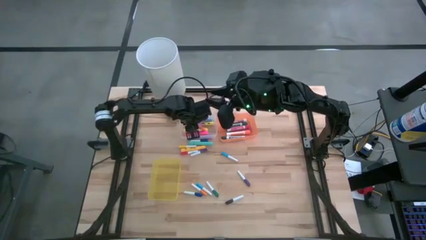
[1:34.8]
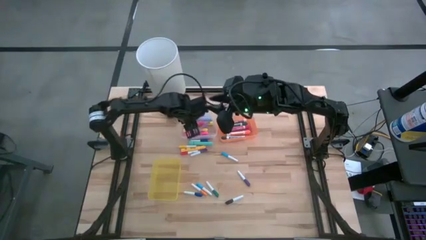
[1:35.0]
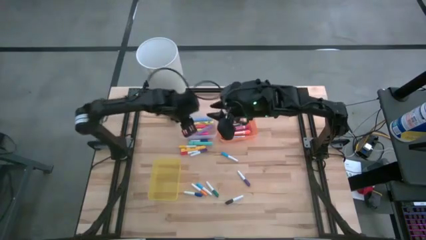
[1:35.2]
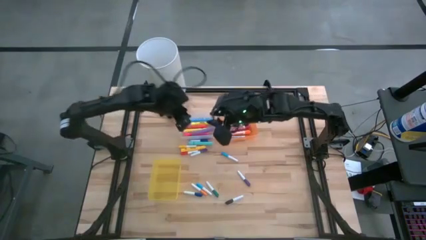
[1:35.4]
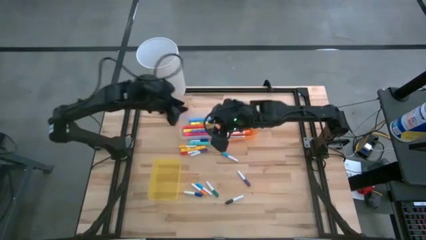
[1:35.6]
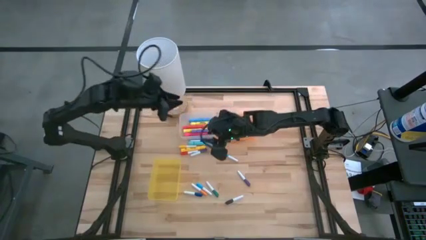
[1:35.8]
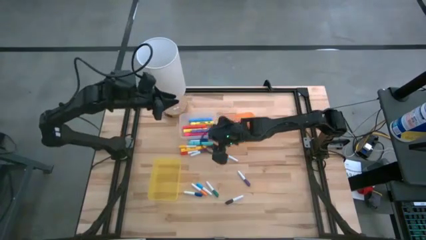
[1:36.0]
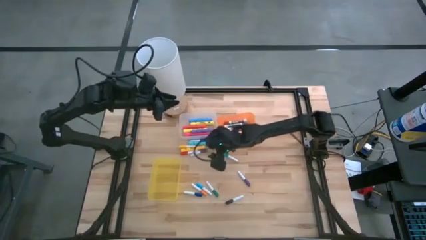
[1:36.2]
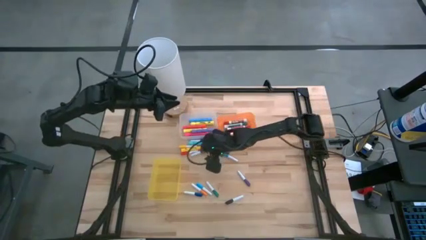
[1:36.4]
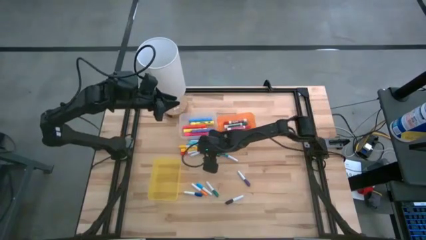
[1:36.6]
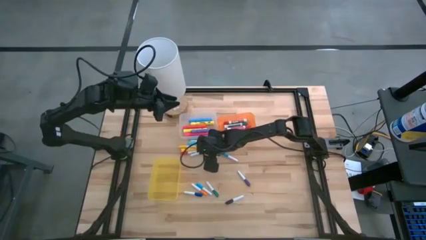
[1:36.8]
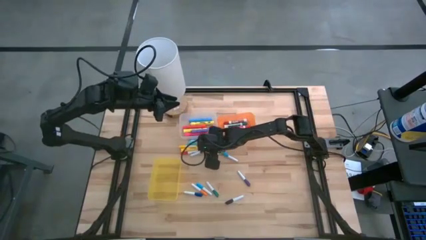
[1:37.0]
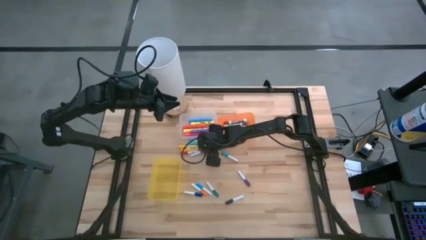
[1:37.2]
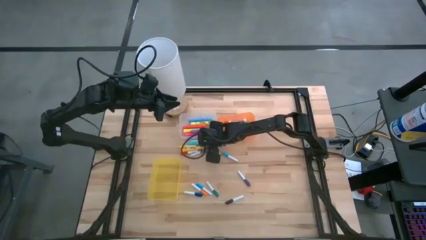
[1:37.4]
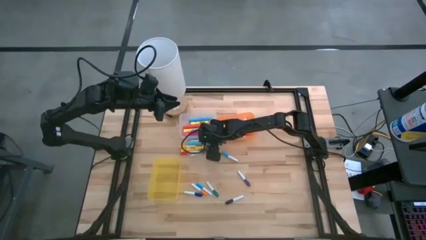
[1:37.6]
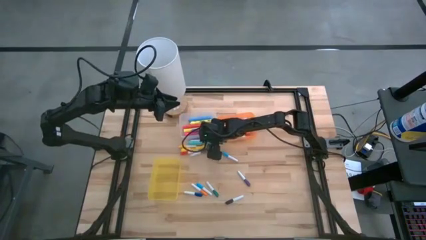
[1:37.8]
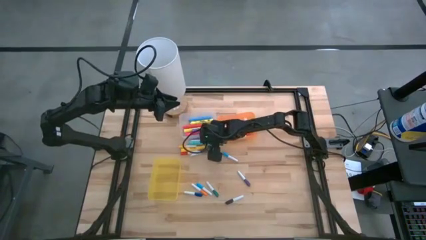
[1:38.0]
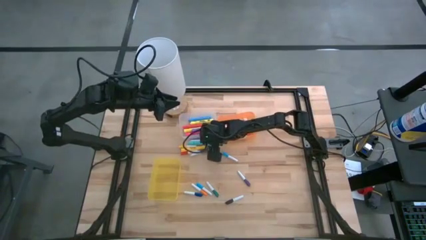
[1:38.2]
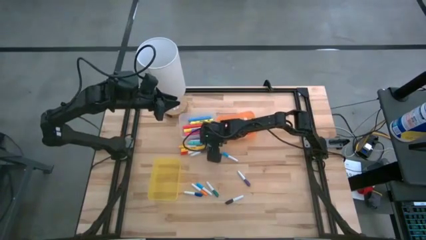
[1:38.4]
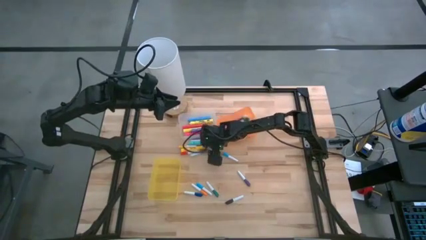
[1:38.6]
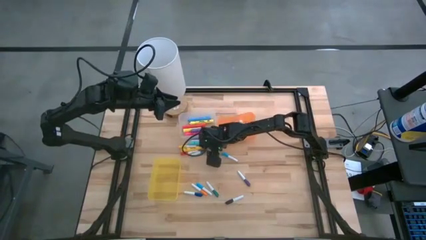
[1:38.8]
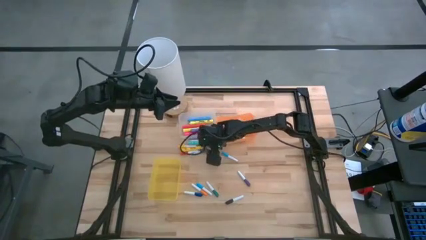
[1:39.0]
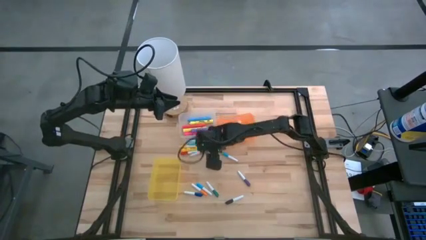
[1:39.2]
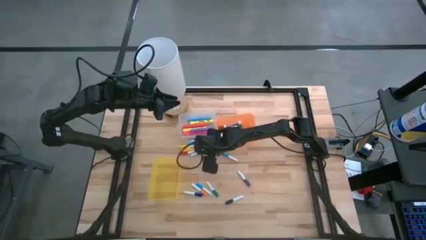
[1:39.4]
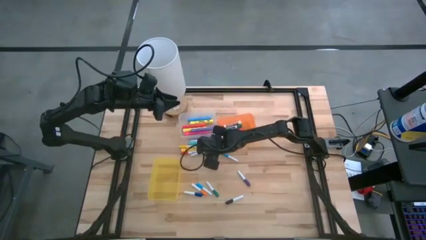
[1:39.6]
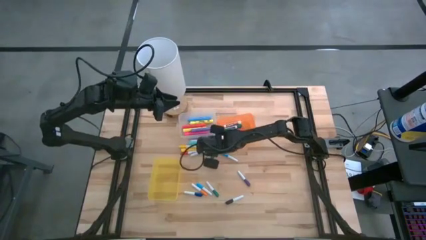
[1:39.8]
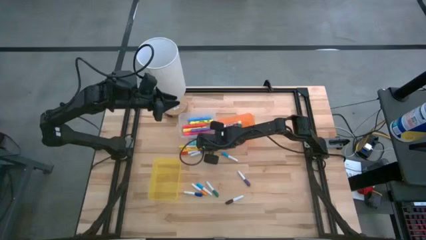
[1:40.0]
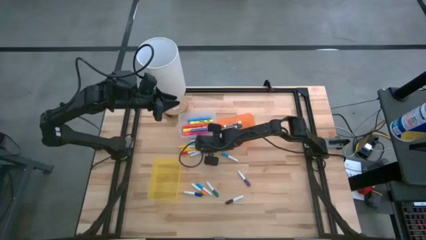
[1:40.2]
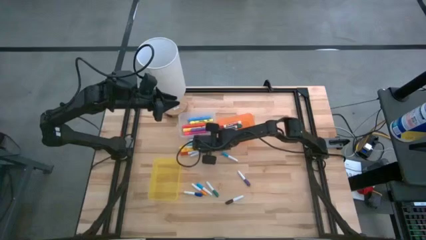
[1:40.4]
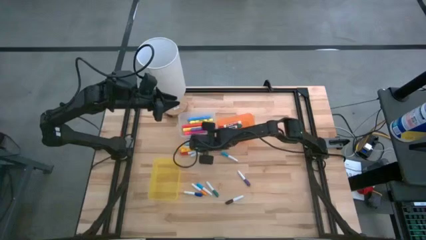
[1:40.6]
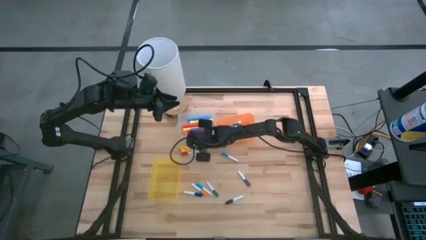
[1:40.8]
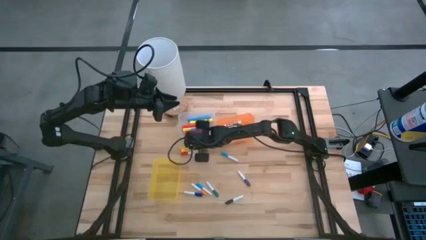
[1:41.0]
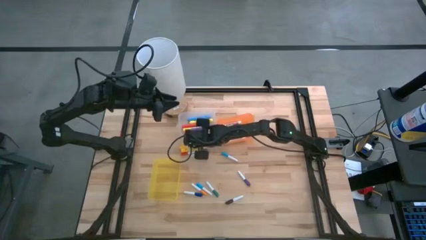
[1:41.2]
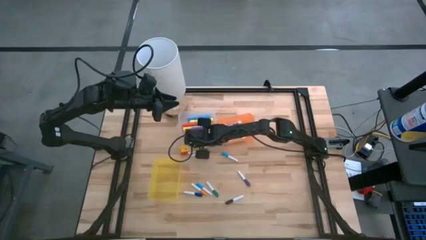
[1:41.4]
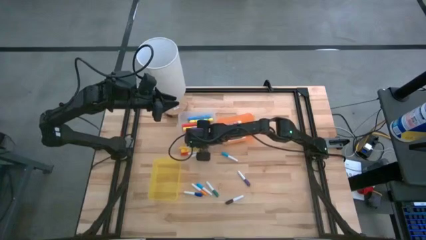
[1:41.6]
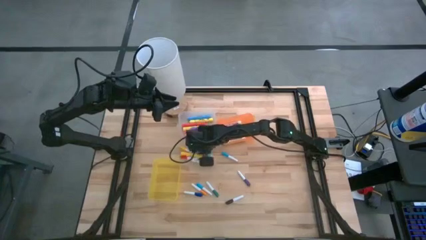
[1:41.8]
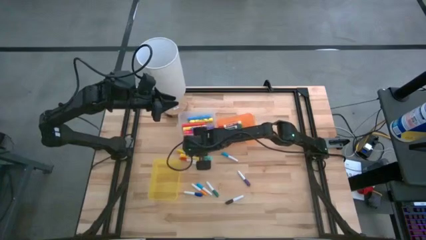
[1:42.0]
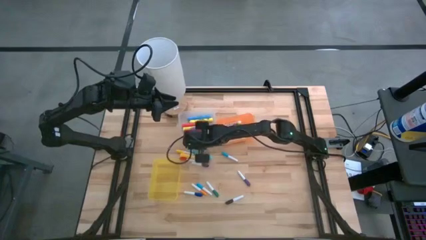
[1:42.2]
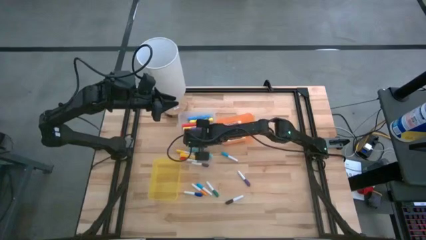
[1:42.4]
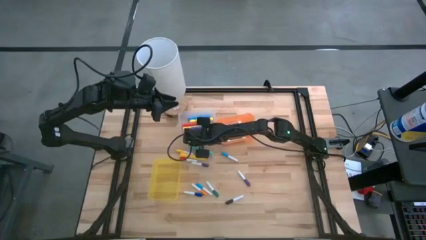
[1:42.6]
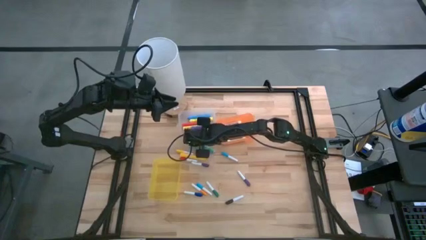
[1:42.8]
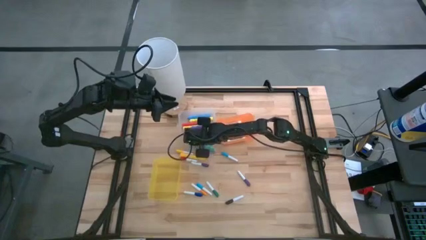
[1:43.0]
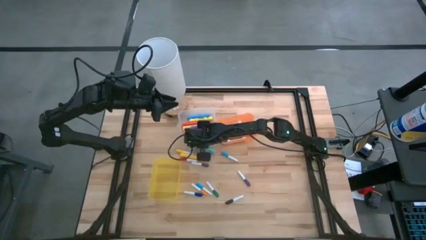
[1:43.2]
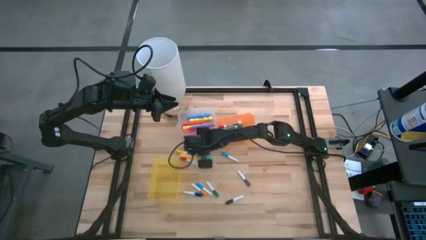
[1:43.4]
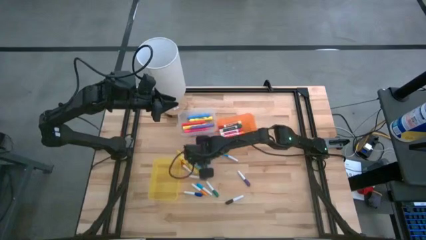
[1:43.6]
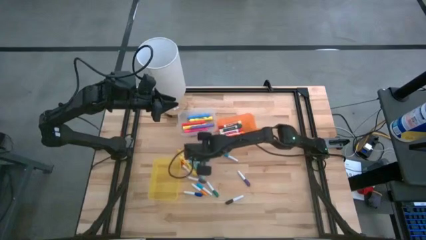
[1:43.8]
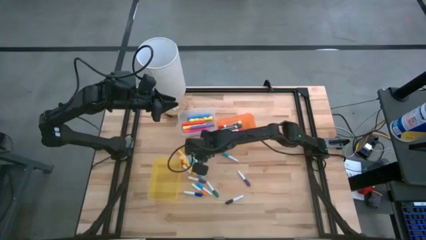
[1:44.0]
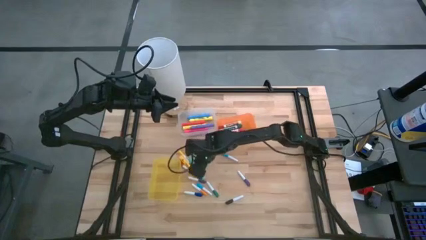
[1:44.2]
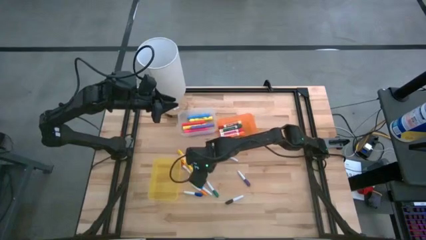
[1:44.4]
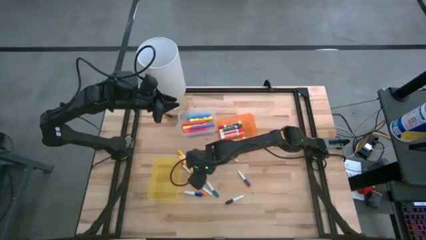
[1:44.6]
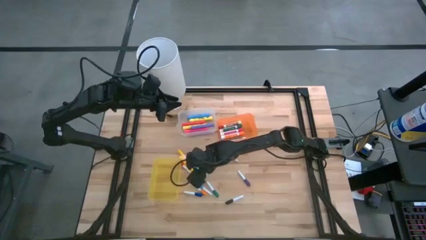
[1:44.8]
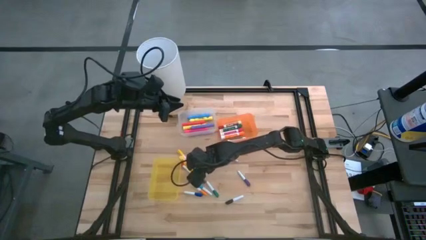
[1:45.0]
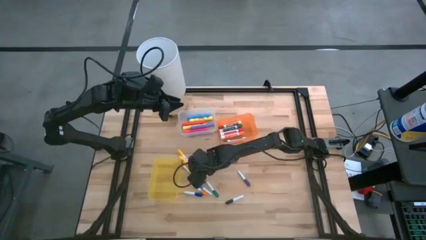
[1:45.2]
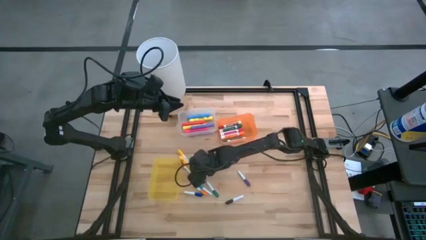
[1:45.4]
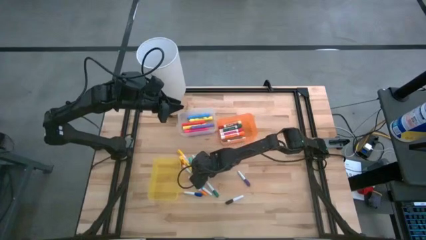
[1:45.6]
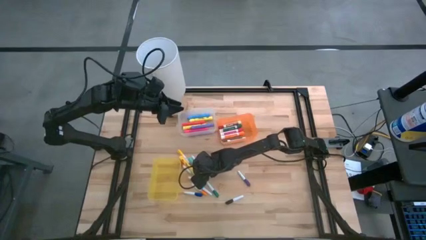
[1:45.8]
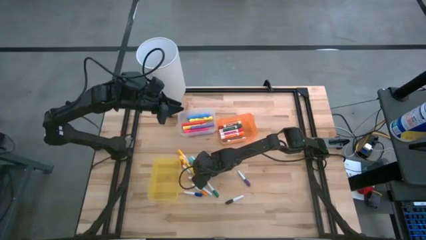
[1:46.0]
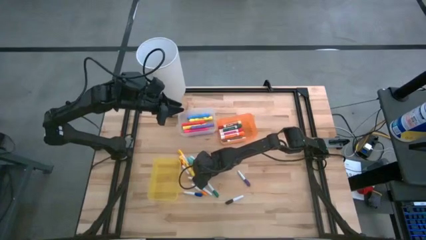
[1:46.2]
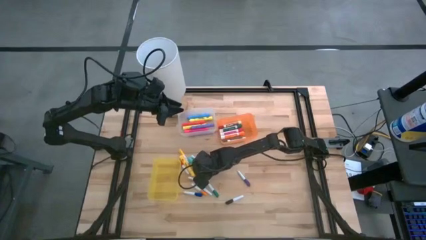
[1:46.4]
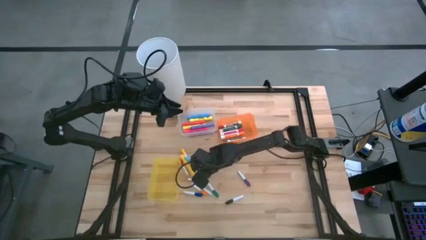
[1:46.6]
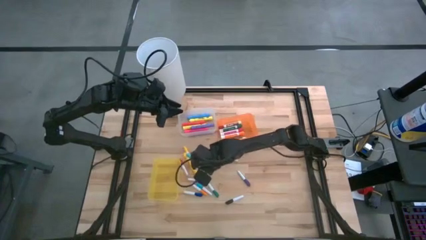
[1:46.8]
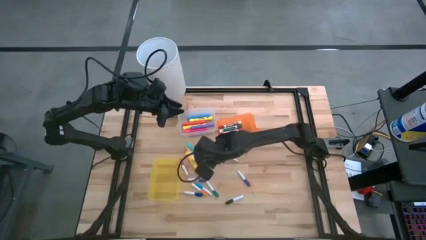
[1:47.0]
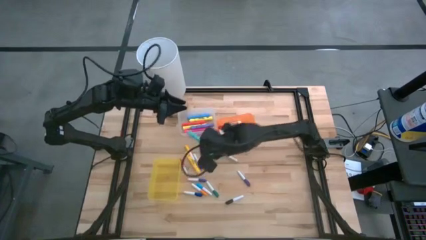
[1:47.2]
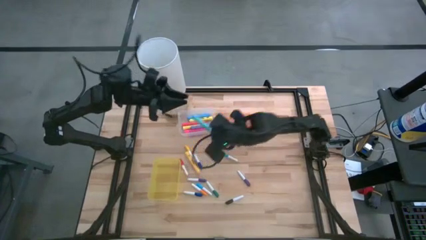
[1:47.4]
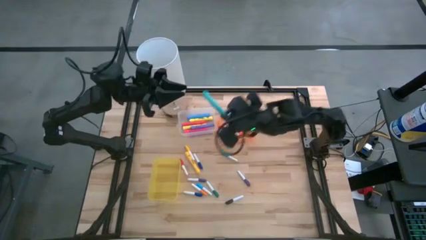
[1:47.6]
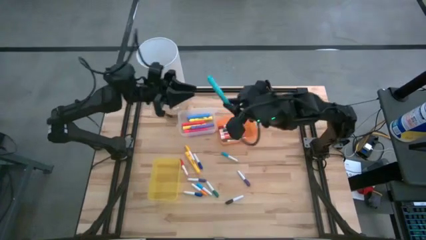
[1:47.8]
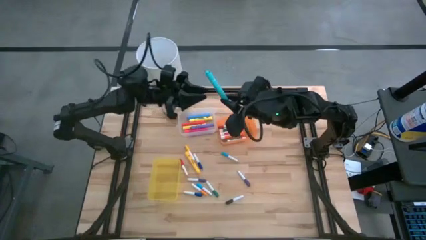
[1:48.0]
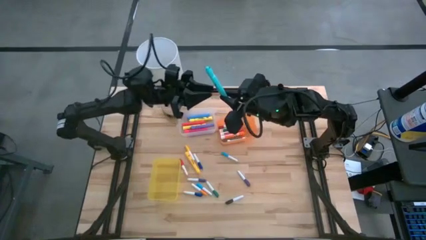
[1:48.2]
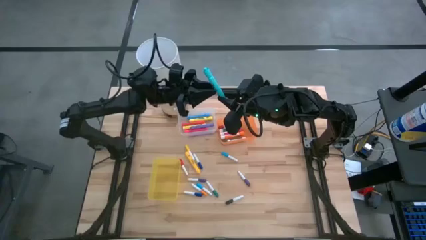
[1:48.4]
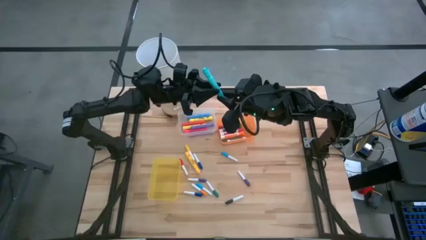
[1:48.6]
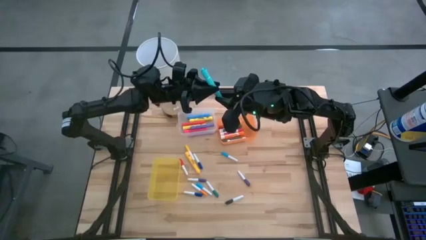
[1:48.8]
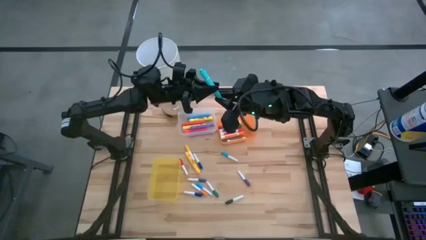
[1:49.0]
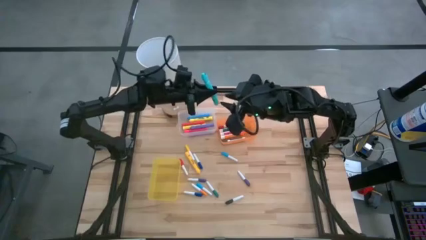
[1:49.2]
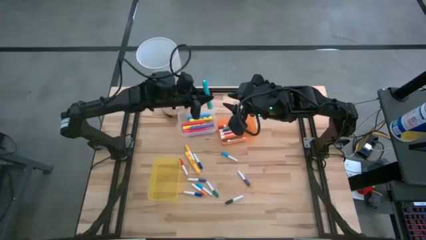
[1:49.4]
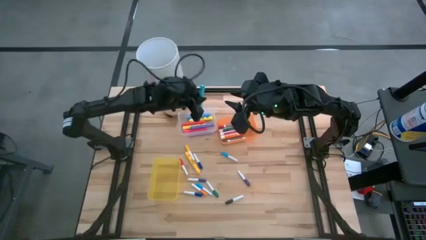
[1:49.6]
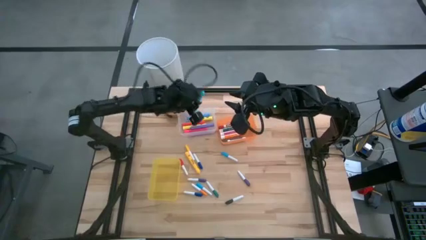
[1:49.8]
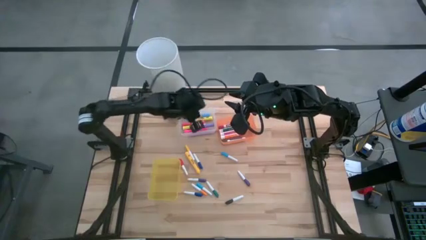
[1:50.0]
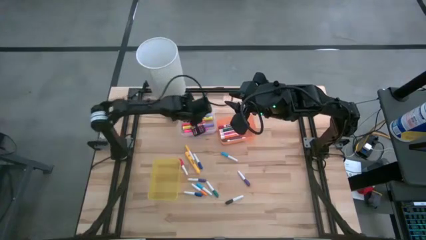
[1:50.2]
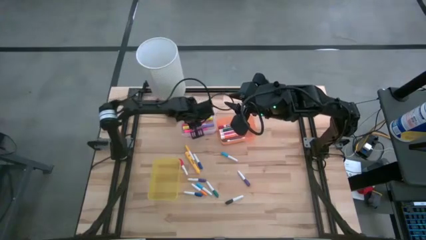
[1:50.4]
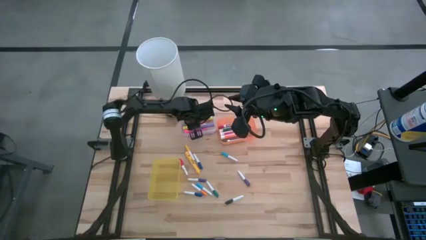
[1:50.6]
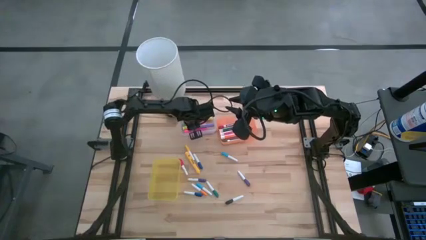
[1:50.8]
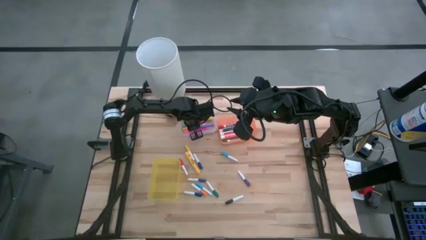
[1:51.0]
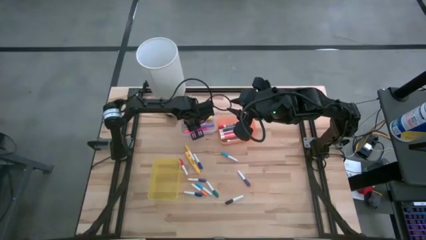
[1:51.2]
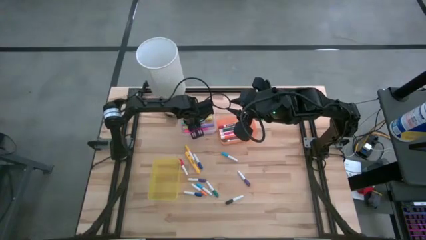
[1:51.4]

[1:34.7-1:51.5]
Task: Pick & Place Markers
Put the light blue highlighter into the transparent bin
